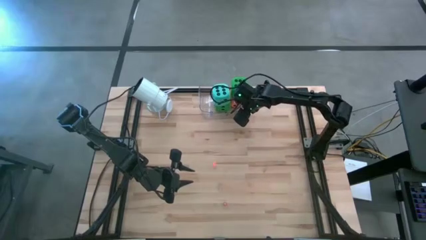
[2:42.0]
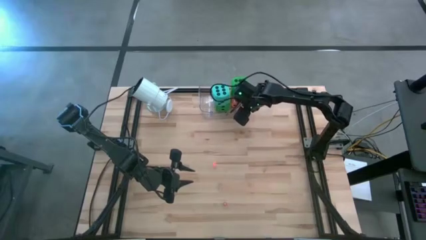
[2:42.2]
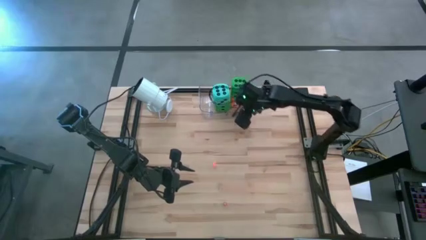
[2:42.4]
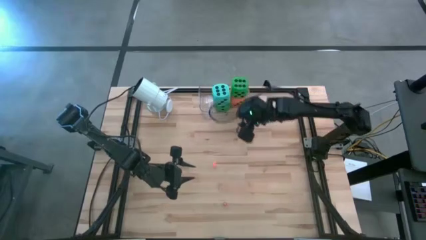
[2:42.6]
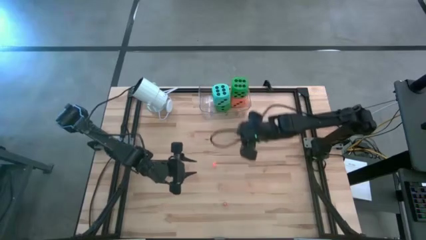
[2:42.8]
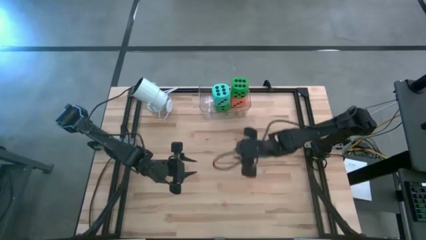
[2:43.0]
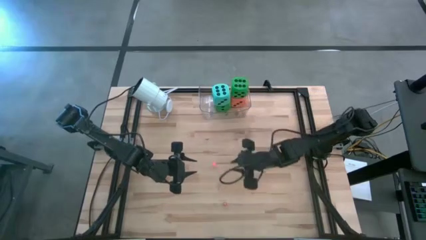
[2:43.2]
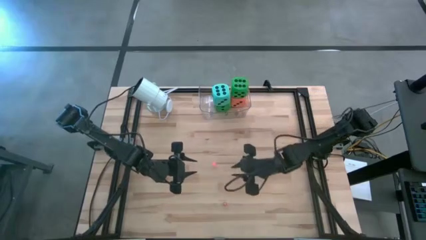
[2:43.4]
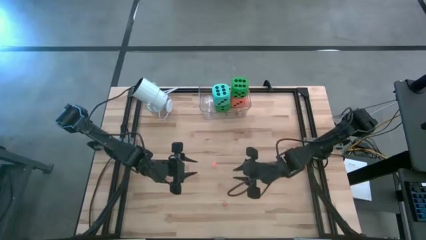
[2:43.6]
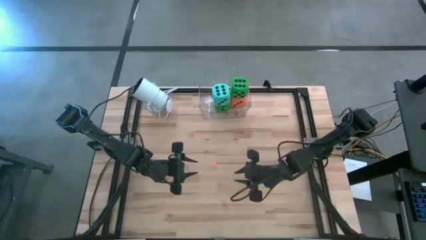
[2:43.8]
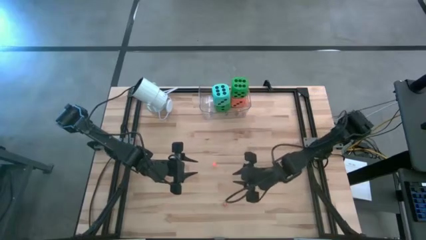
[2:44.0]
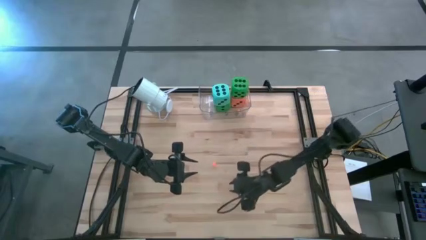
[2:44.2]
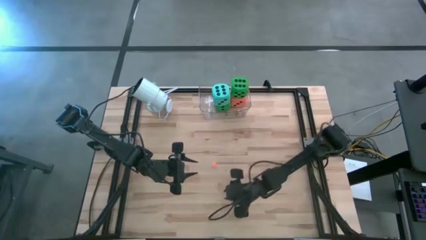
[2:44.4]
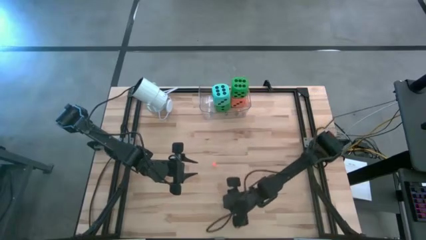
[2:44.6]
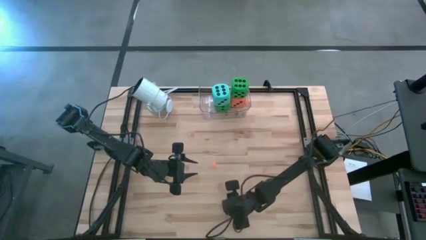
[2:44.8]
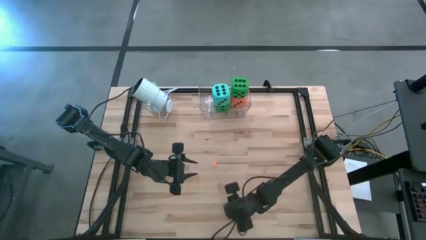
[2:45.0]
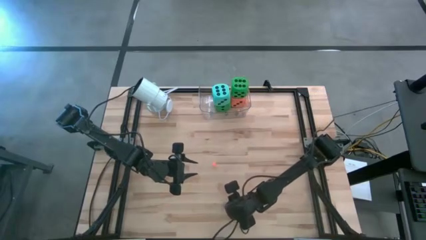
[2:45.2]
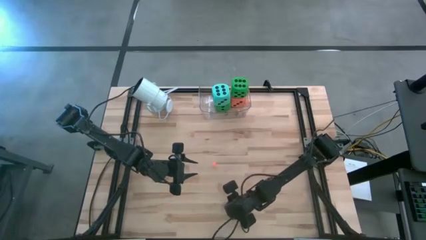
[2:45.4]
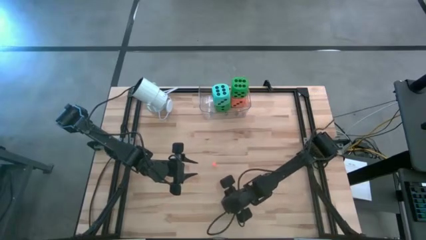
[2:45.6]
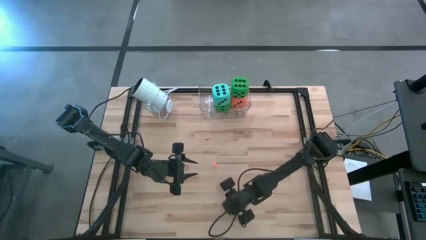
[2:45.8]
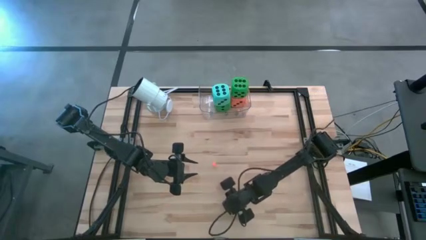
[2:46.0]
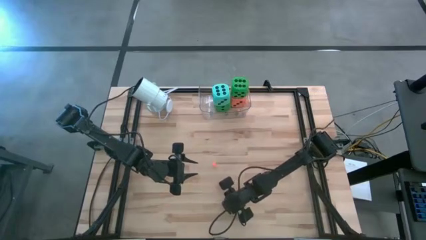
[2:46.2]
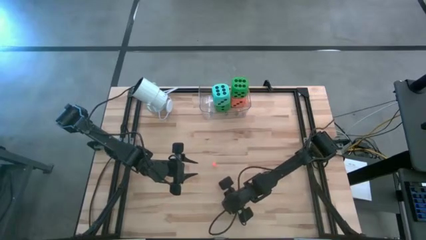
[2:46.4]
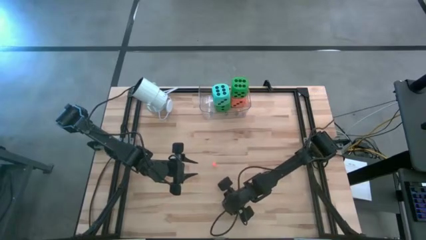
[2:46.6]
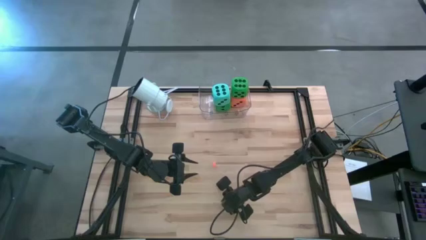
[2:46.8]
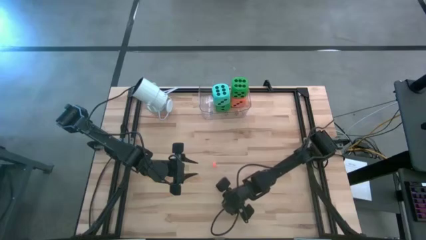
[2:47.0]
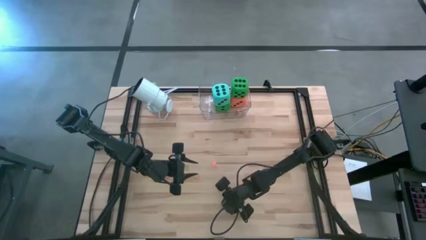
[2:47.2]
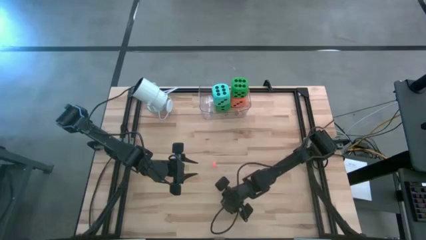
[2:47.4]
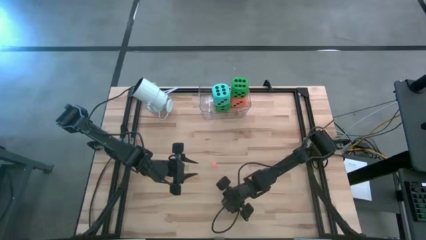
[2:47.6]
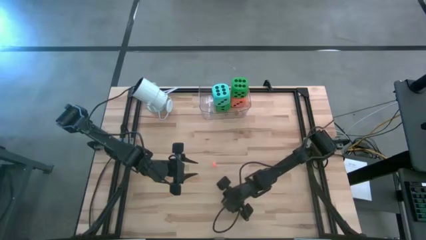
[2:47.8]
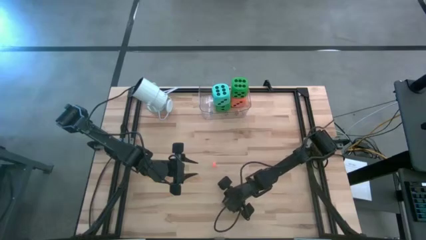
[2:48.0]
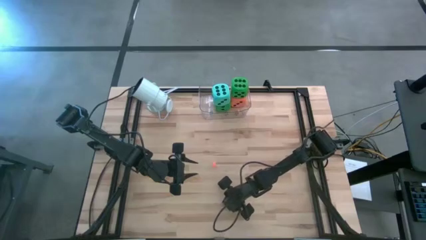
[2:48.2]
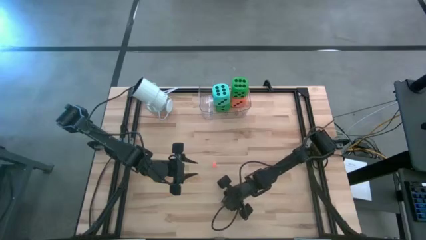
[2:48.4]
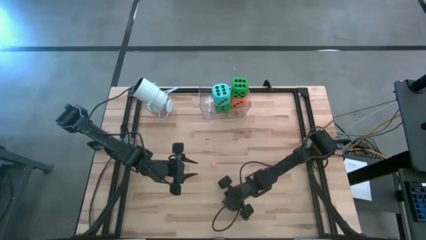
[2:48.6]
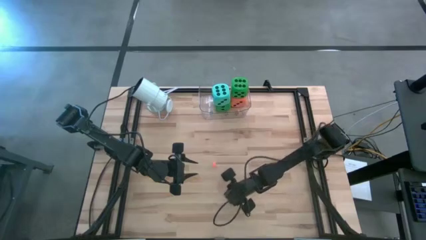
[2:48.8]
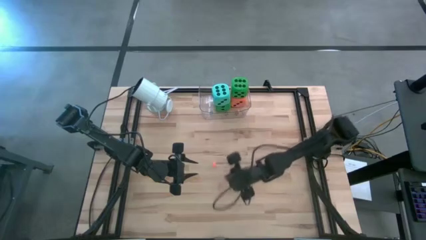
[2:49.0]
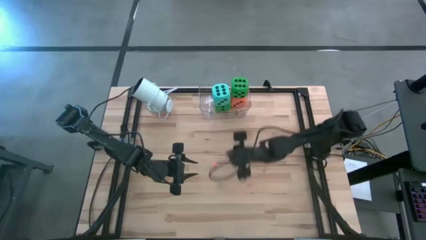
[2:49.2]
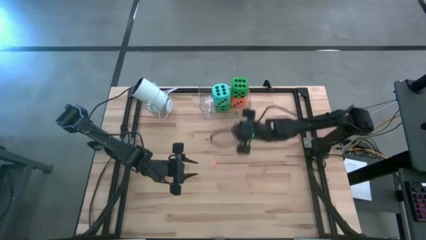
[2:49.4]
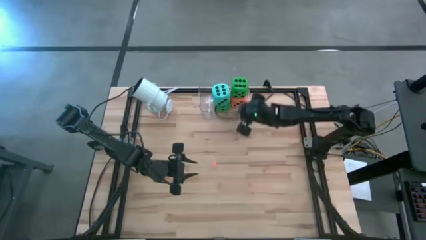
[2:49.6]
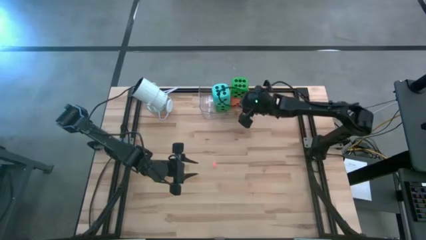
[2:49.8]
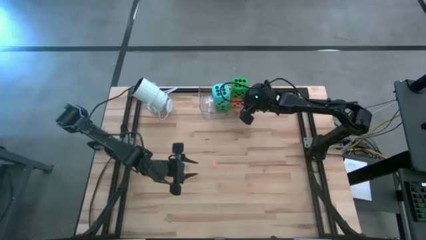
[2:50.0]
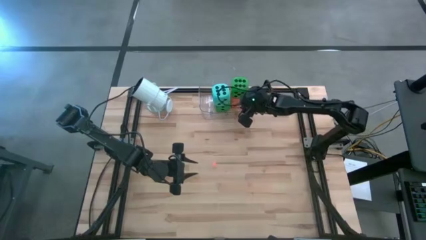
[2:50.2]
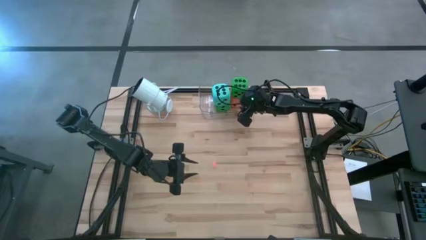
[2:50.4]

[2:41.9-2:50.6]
Task: Pick & Place Dice
Put the small red dice into the transparent bin

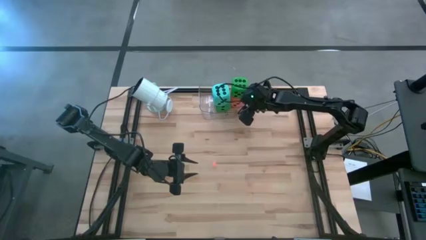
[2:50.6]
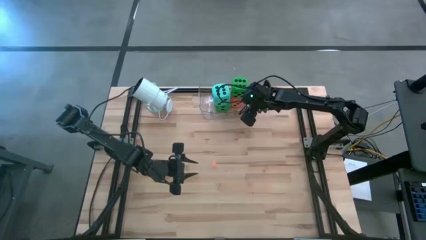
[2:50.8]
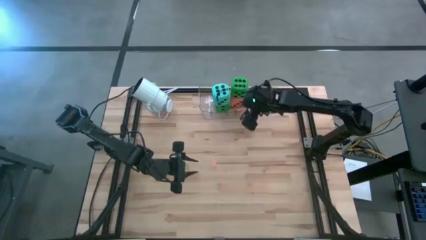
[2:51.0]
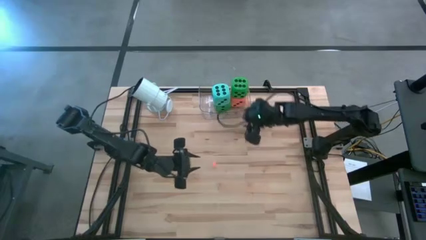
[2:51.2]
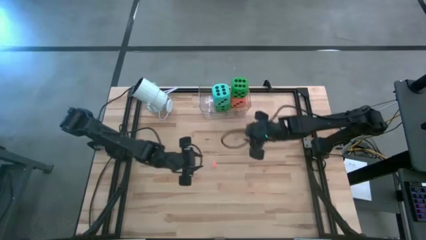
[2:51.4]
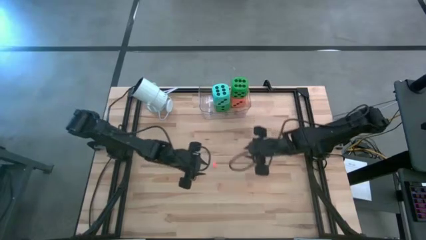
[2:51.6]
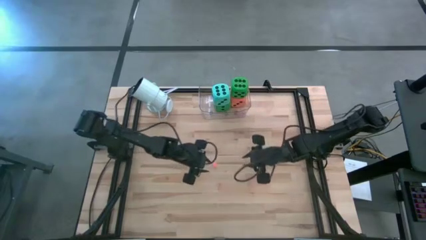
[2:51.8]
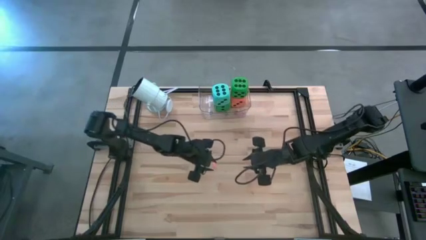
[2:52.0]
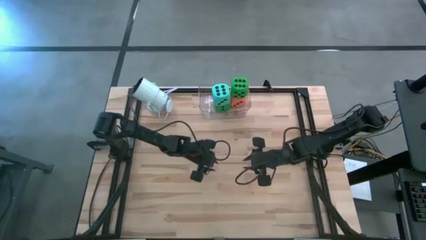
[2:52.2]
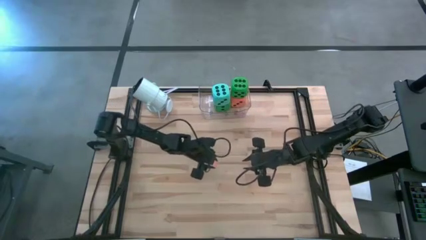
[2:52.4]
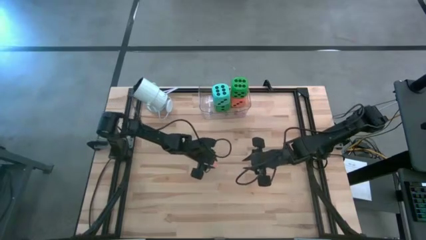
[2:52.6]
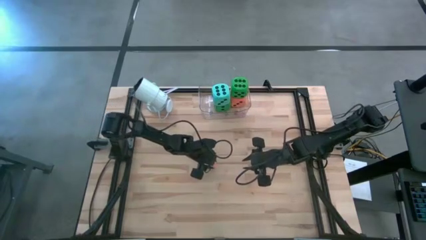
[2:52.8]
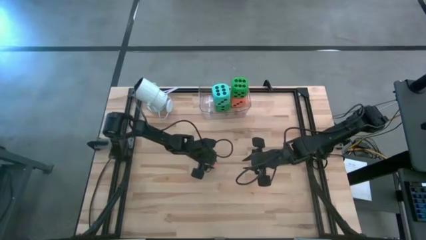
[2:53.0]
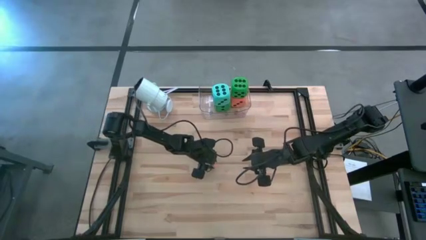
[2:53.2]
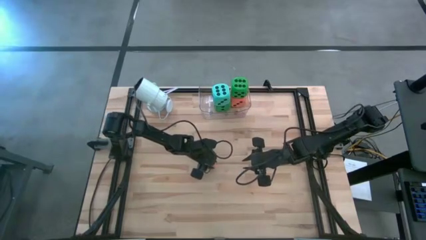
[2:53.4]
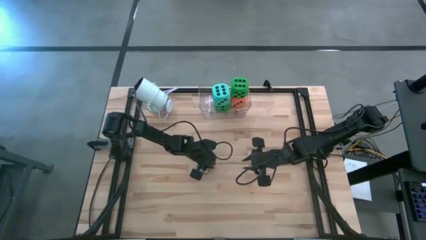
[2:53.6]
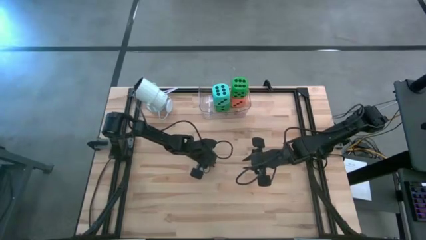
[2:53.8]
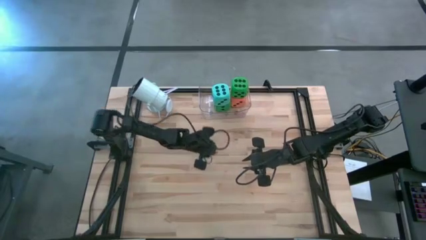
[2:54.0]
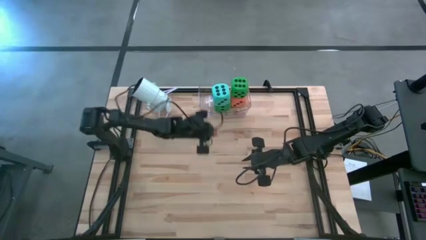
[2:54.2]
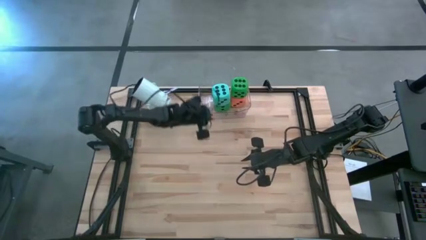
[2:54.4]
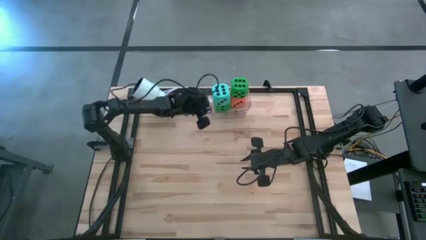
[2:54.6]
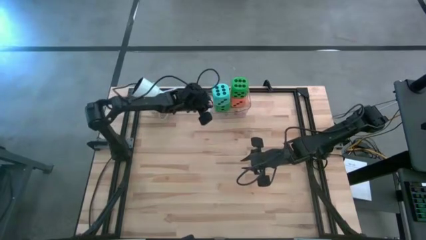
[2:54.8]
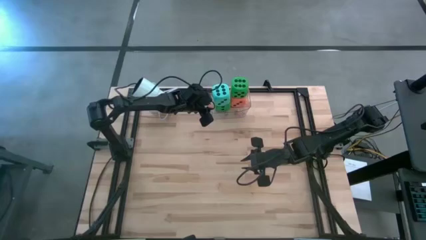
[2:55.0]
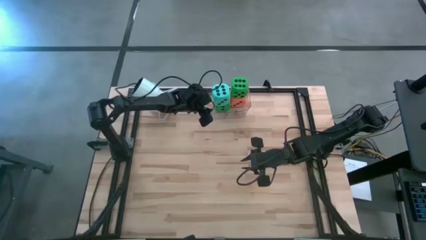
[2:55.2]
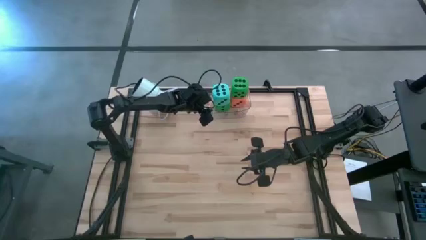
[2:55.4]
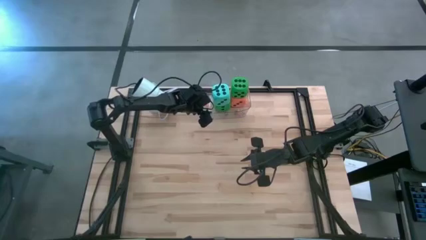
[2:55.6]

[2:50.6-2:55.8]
Put the small orange dice into the transparent bin

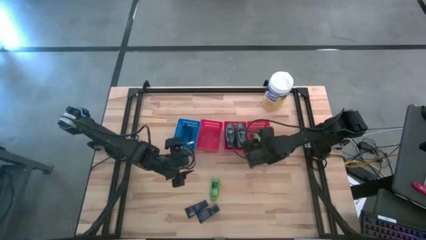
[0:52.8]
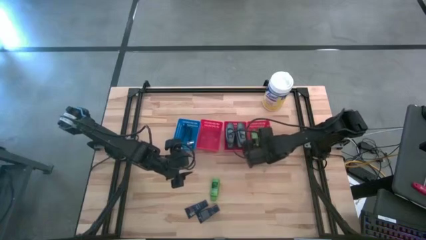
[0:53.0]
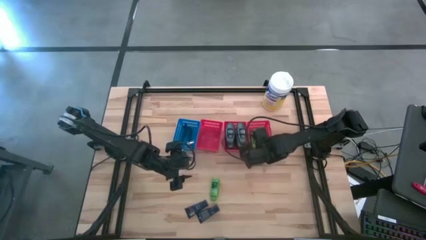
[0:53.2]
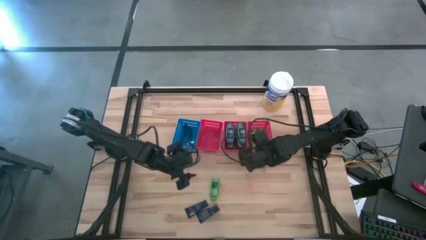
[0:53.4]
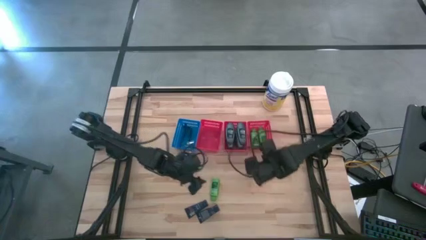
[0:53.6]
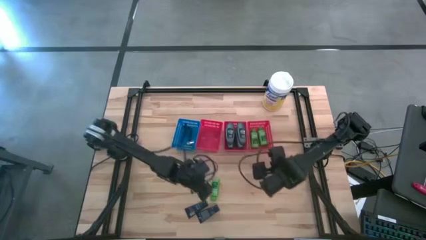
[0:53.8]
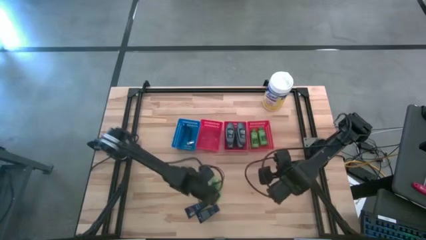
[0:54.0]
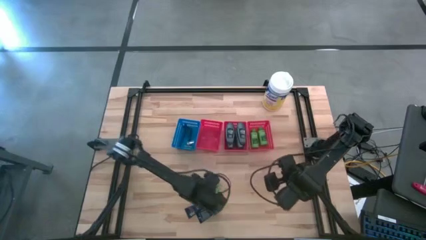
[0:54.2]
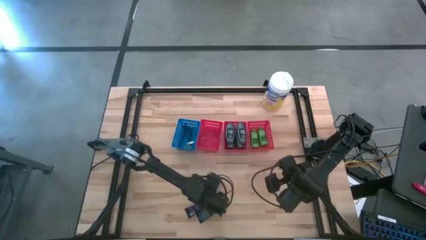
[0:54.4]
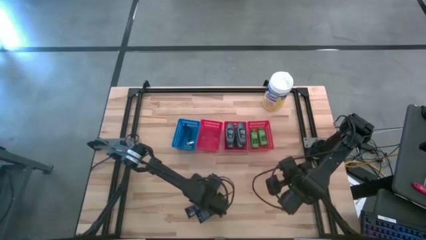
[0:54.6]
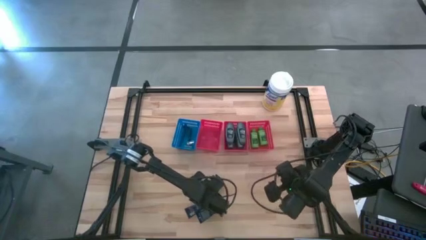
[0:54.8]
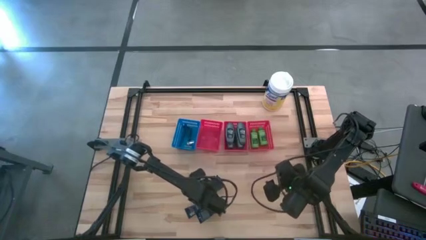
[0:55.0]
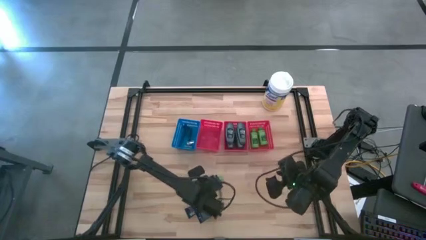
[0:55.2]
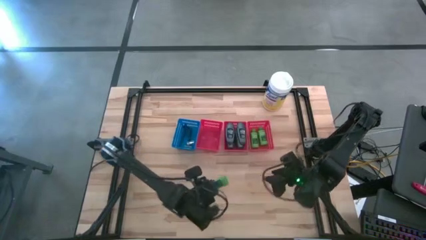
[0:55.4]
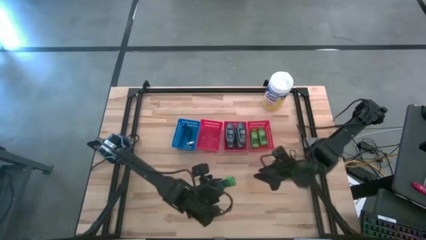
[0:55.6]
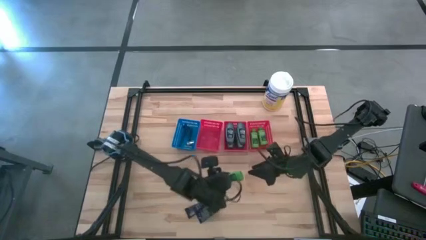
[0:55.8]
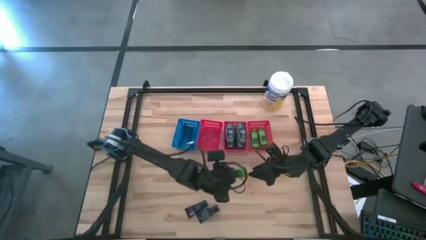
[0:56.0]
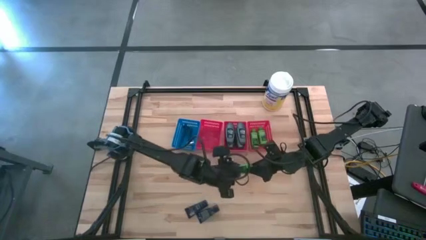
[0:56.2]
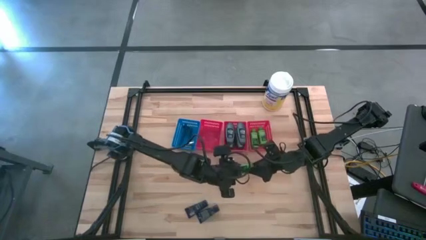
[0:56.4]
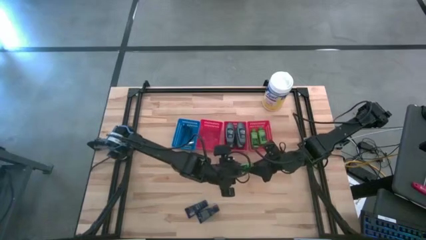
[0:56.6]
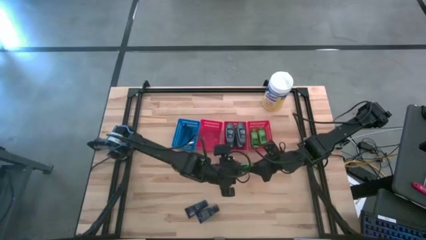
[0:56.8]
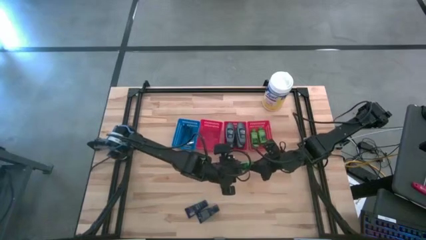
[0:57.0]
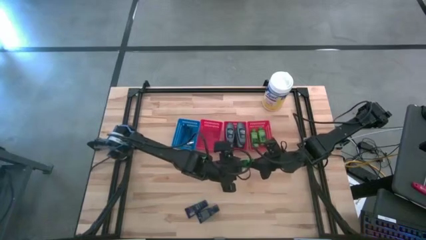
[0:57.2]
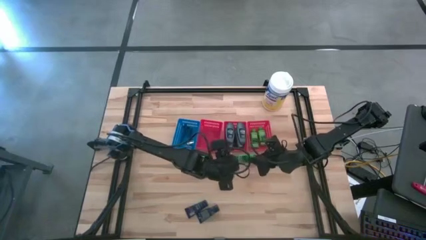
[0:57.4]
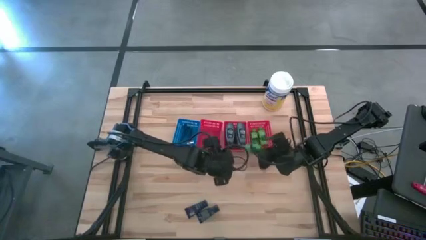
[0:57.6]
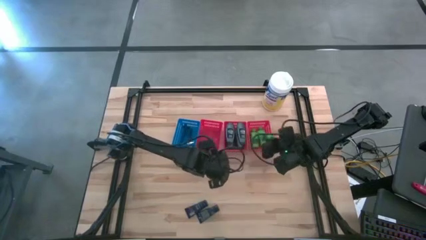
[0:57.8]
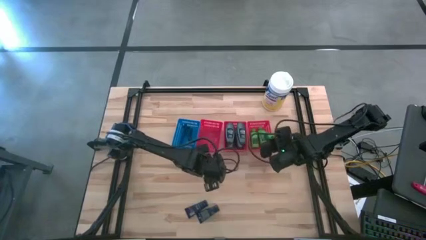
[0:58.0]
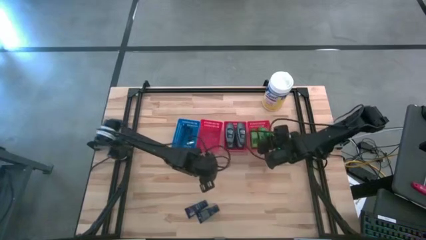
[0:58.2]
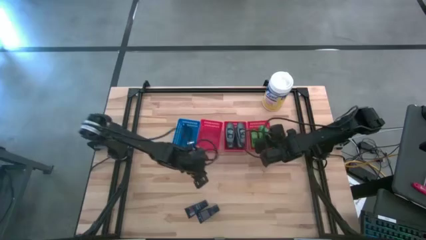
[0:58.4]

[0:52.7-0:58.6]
Task: Pick & Place Travel size toiletries
Put the green shampoo bottle into the right red bin
